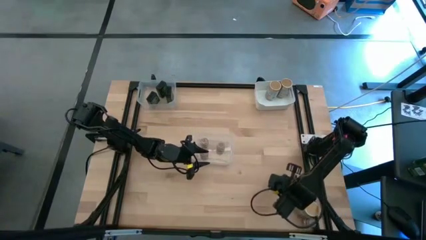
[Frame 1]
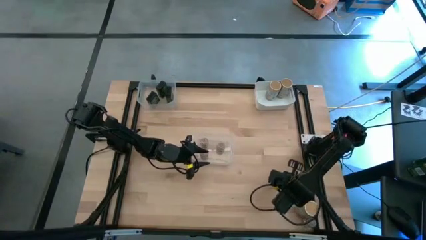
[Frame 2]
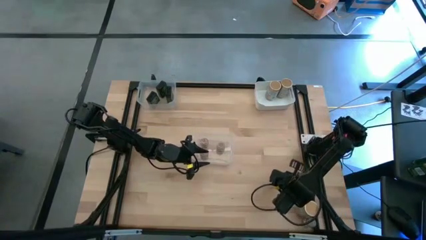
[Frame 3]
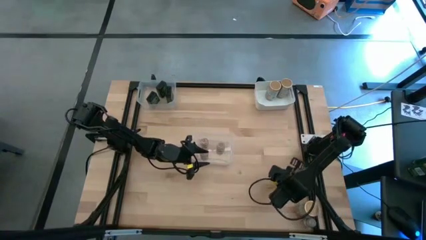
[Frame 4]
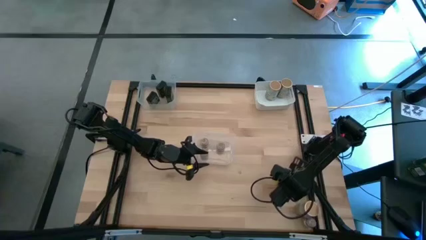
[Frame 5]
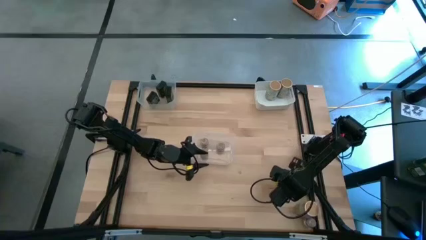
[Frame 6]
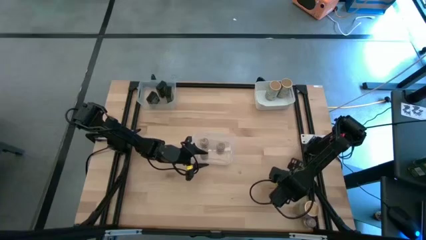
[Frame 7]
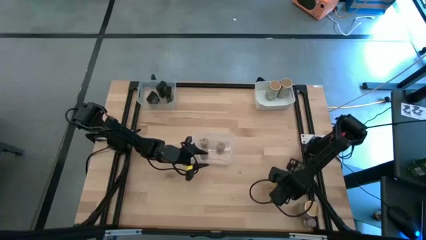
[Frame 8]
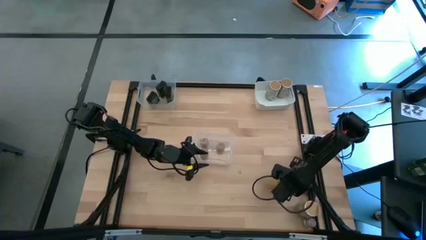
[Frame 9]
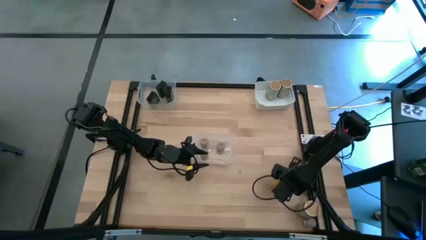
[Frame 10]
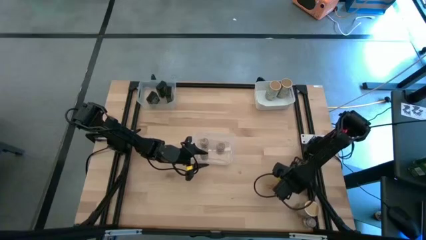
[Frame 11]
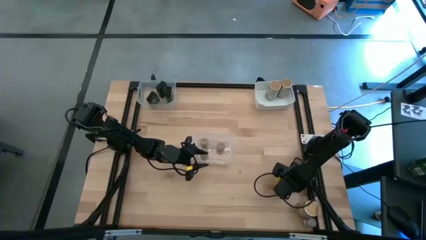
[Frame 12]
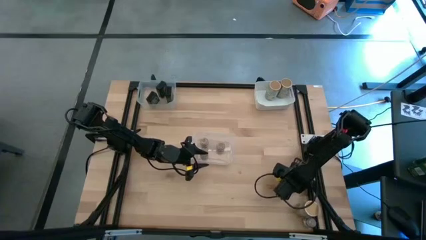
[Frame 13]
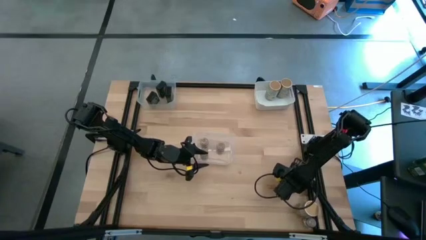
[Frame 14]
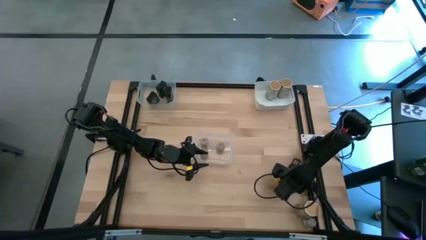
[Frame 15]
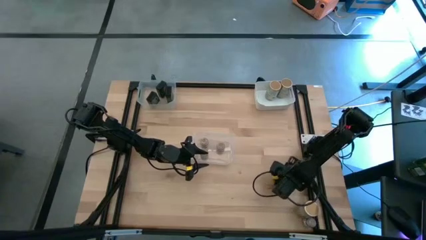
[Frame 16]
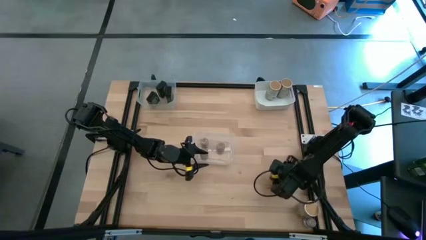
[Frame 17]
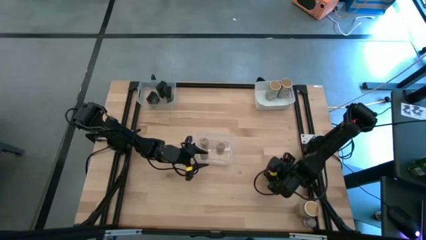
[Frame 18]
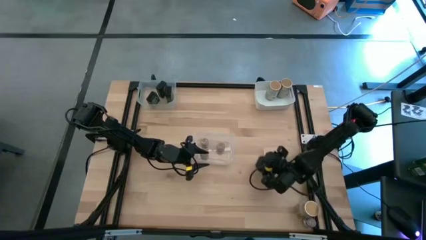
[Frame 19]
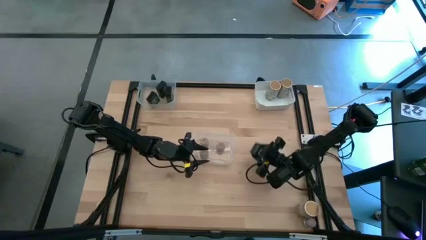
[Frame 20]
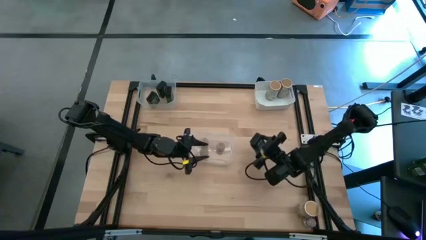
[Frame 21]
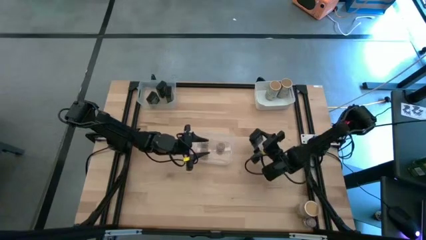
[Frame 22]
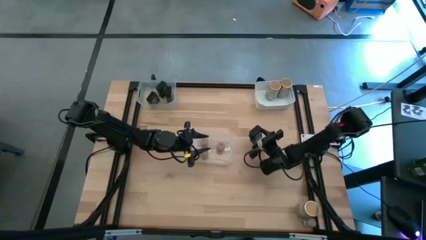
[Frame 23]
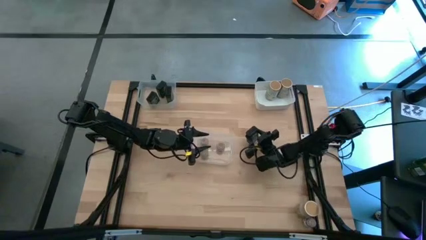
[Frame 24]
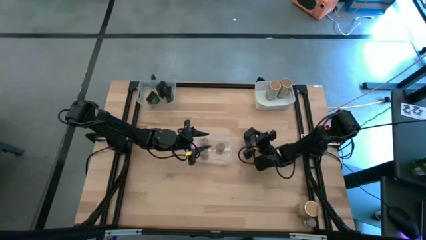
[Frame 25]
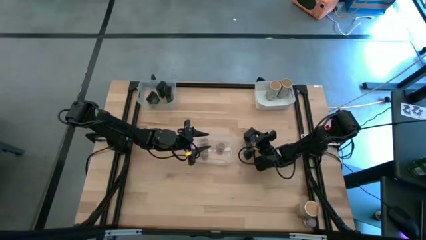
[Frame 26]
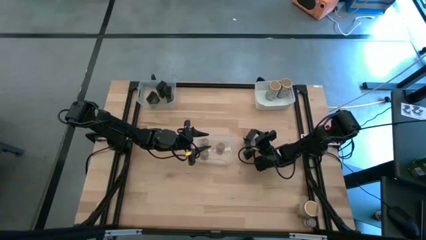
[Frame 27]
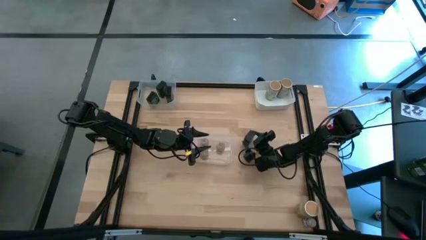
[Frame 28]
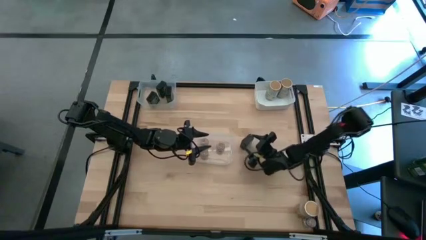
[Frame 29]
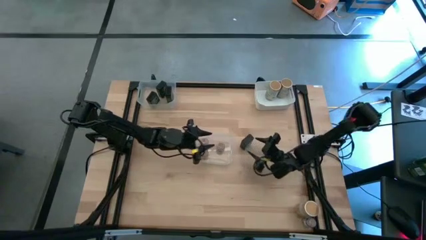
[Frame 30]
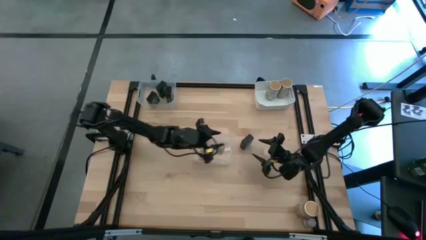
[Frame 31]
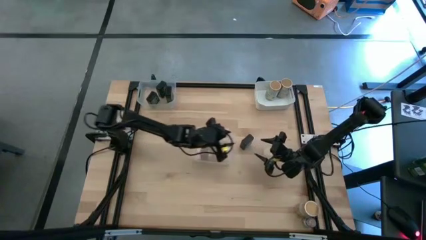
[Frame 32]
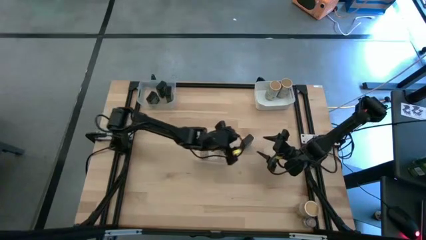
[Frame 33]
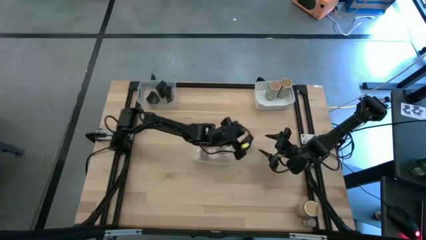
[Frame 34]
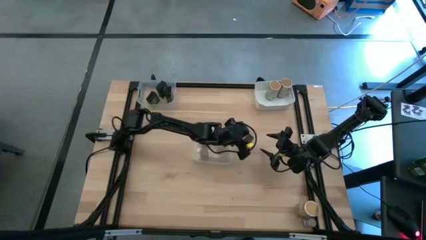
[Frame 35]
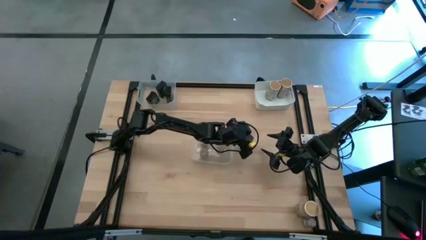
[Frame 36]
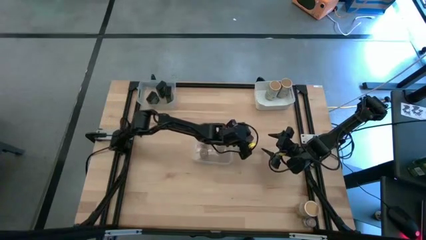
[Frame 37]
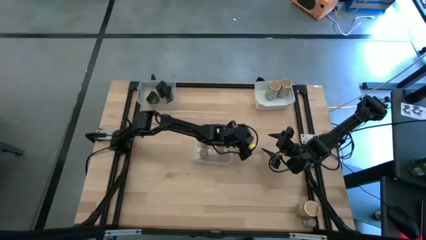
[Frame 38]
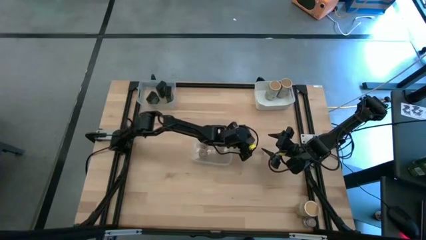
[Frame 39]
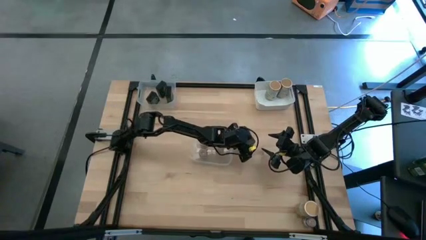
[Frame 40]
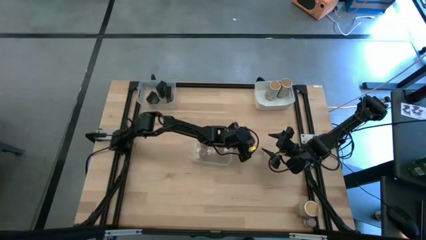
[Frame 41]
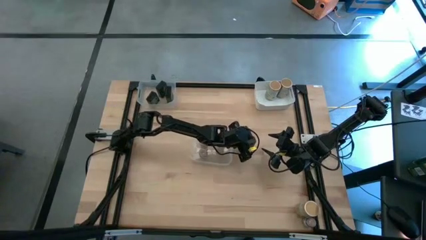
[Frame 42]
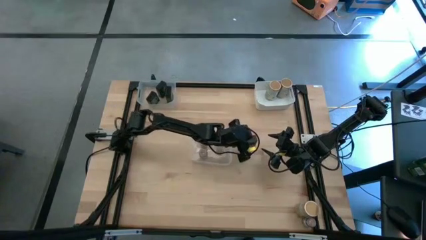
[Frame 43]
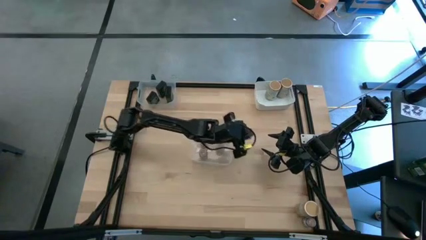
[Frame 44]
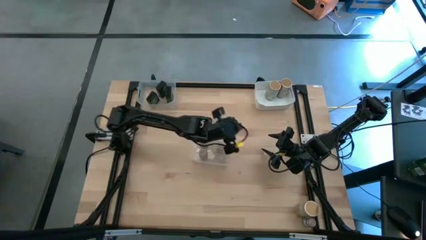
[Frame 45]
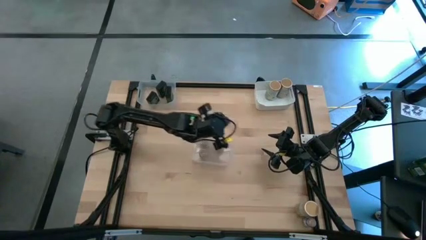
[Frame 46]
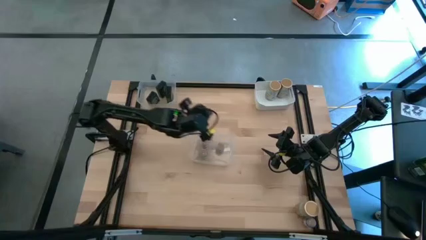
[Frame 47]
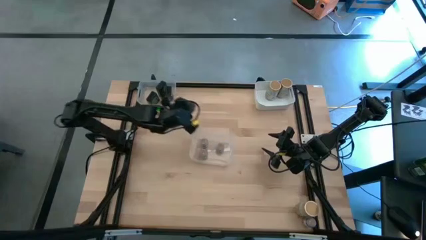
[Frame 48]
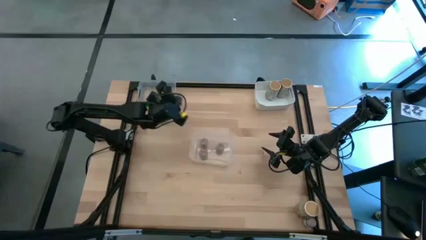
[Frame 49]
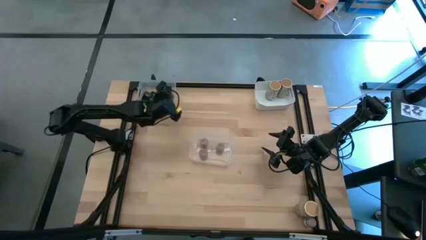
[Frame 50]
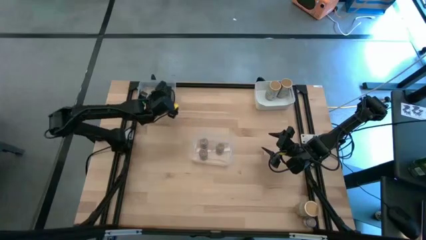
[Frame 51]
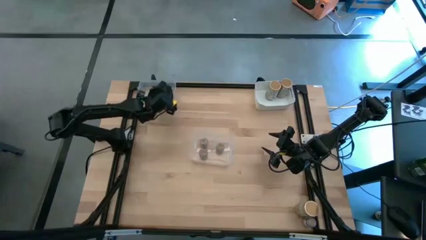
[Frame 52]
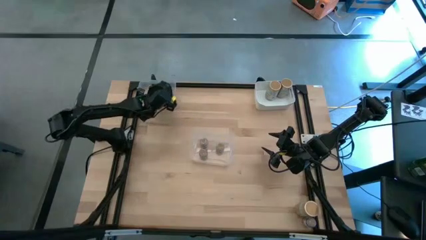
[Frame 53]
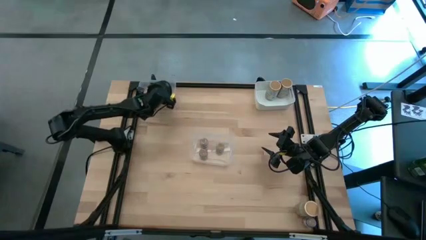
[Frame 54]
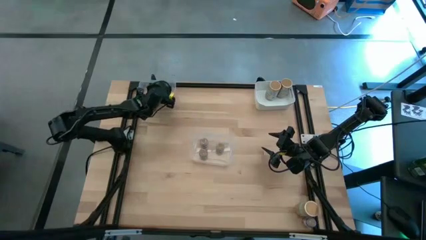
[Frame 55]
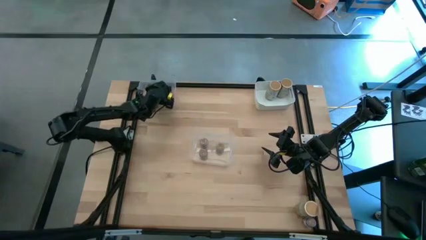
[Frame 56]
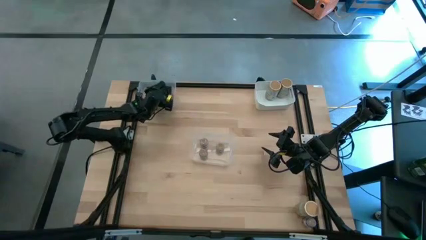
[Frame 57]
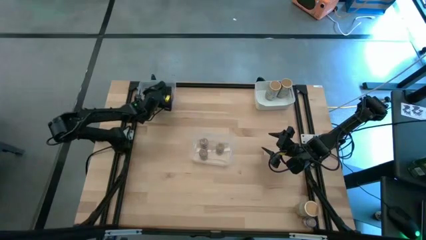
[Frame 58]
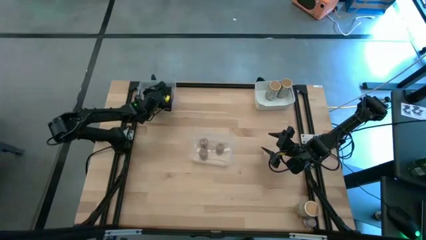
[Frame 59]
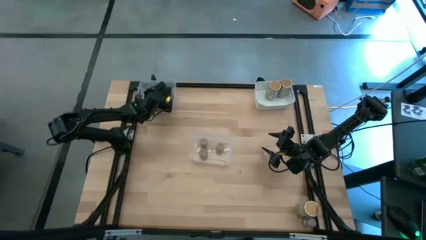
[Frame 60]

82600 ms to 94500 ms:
Task: Sort spices by type
Put the black seasoning can into the top transparent bin
